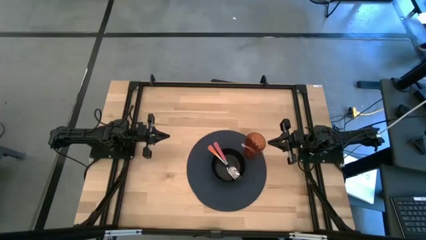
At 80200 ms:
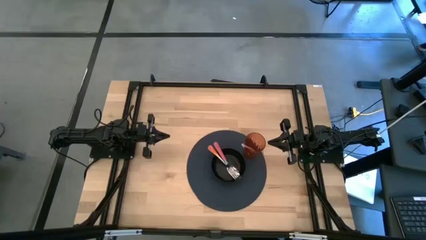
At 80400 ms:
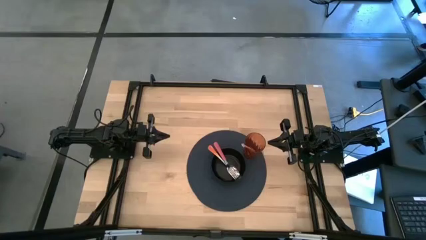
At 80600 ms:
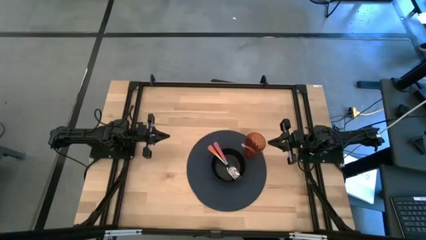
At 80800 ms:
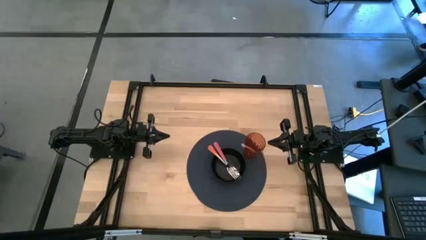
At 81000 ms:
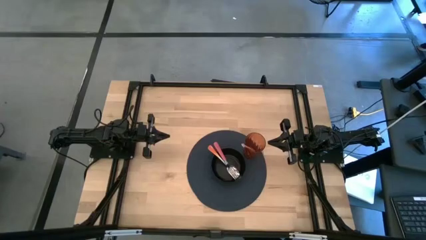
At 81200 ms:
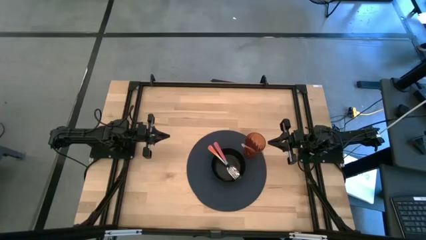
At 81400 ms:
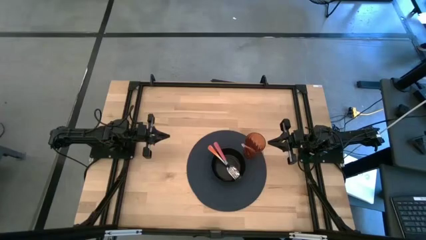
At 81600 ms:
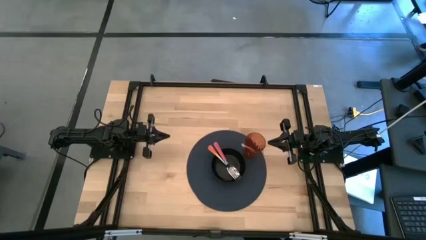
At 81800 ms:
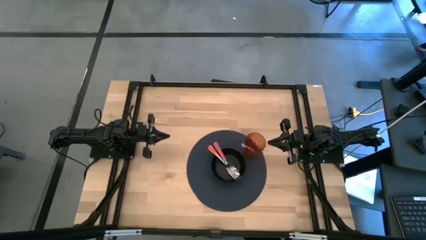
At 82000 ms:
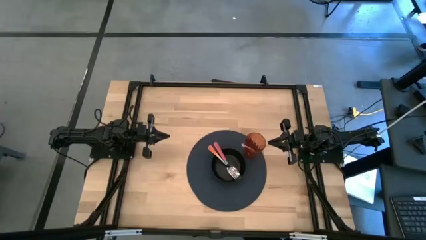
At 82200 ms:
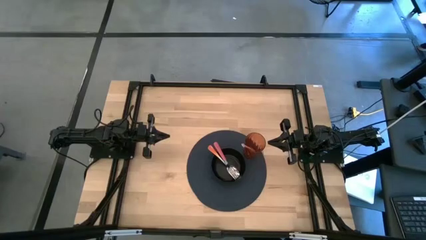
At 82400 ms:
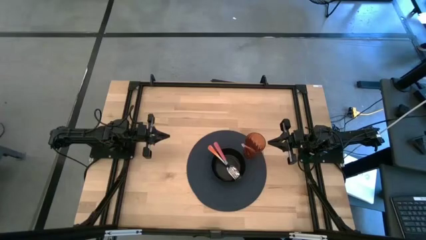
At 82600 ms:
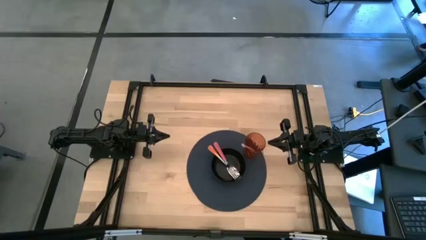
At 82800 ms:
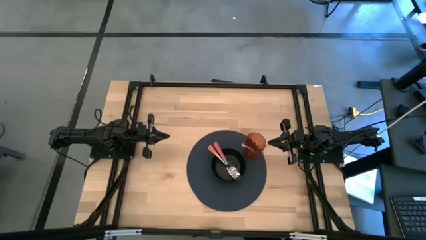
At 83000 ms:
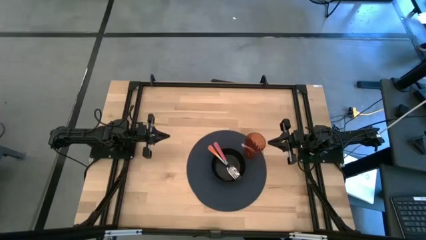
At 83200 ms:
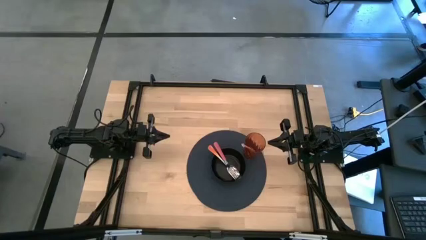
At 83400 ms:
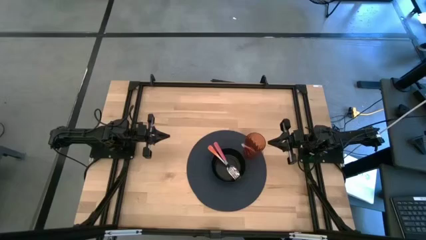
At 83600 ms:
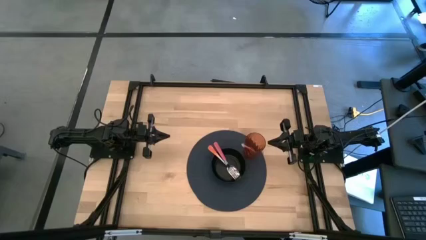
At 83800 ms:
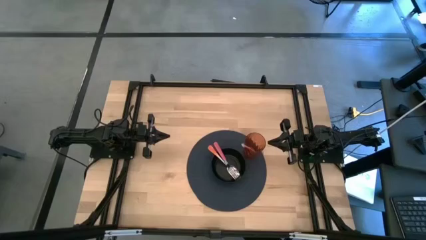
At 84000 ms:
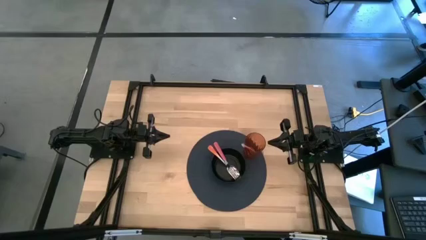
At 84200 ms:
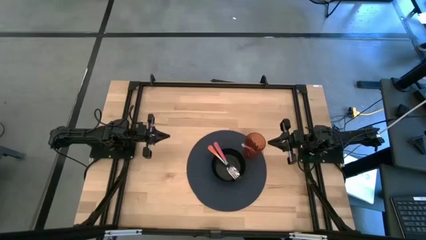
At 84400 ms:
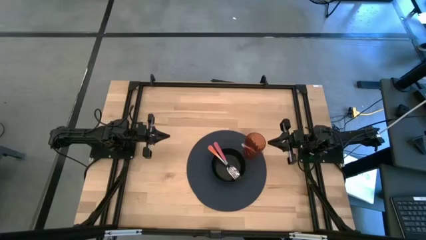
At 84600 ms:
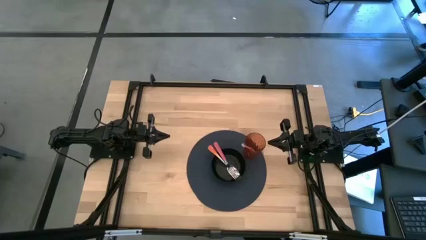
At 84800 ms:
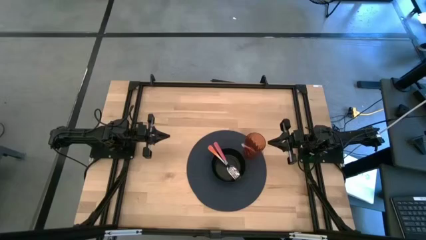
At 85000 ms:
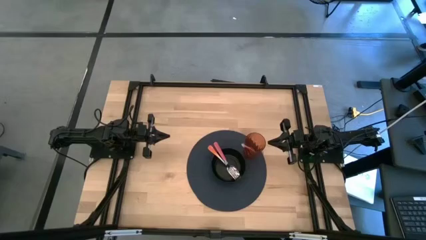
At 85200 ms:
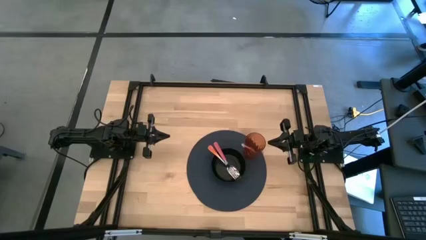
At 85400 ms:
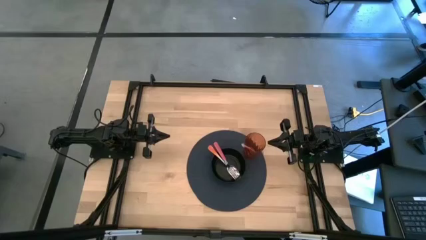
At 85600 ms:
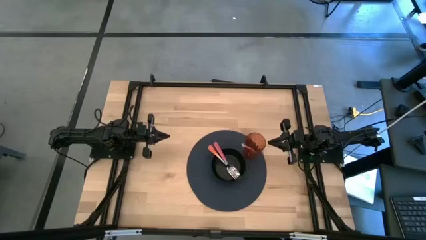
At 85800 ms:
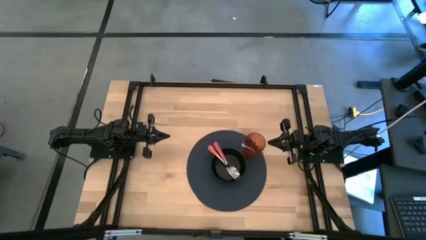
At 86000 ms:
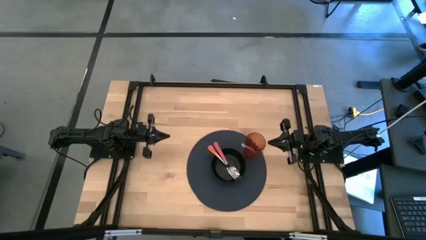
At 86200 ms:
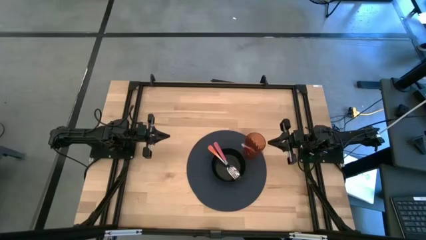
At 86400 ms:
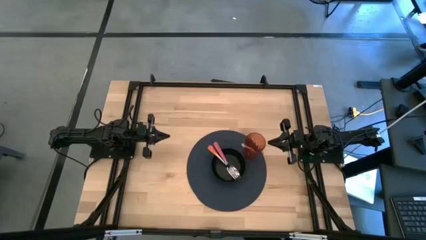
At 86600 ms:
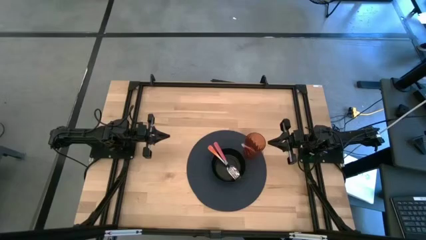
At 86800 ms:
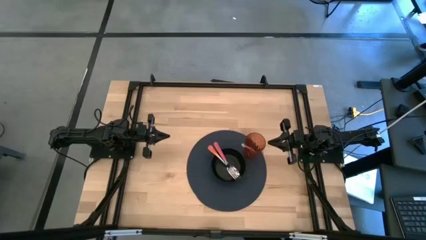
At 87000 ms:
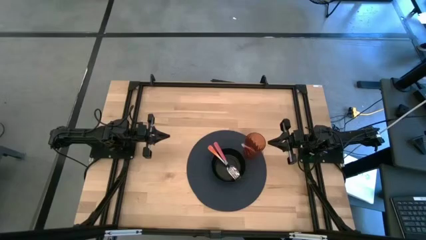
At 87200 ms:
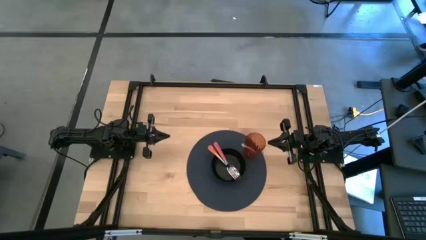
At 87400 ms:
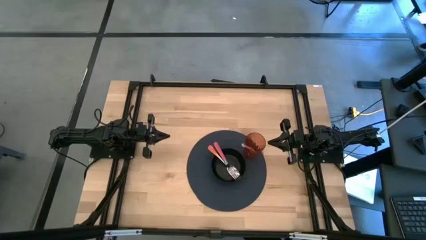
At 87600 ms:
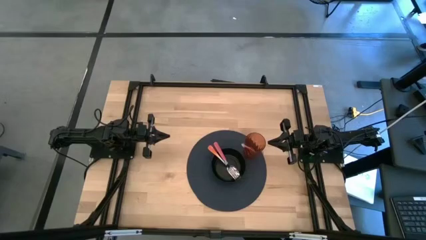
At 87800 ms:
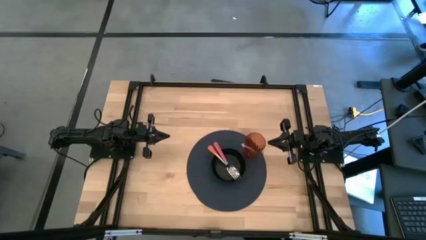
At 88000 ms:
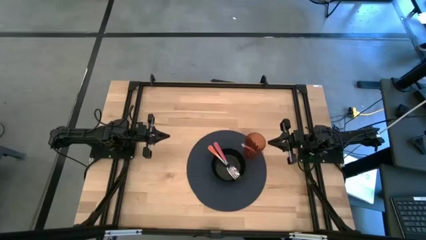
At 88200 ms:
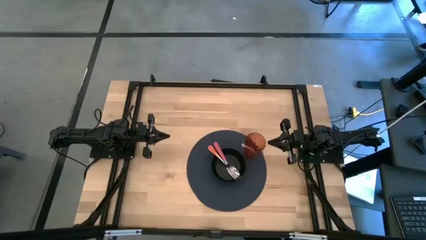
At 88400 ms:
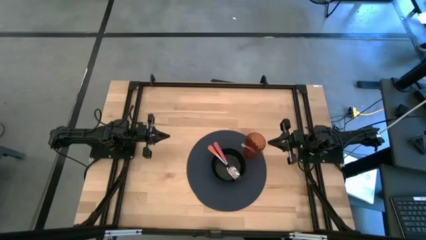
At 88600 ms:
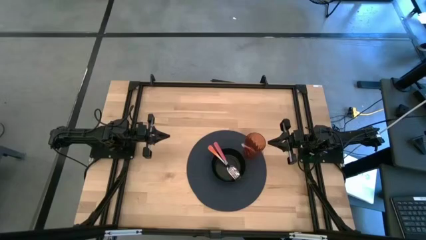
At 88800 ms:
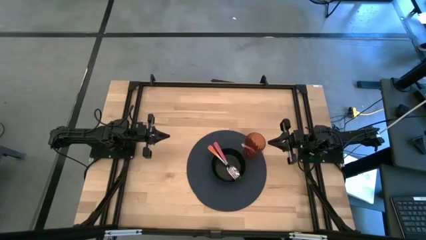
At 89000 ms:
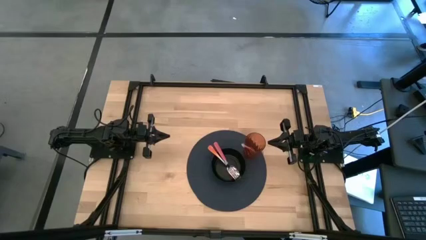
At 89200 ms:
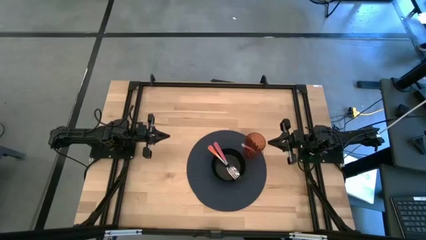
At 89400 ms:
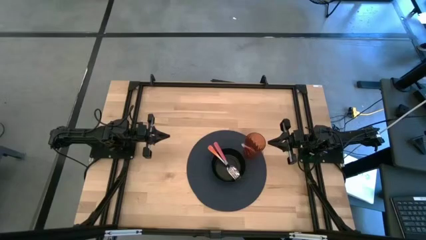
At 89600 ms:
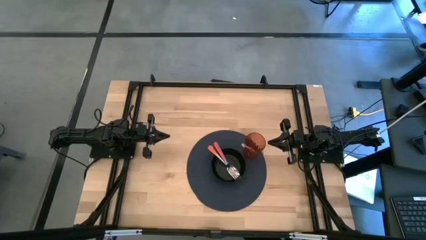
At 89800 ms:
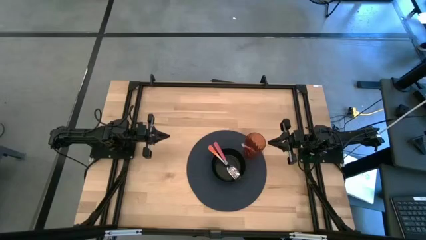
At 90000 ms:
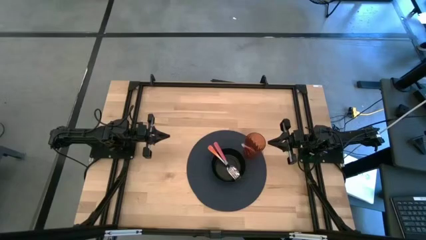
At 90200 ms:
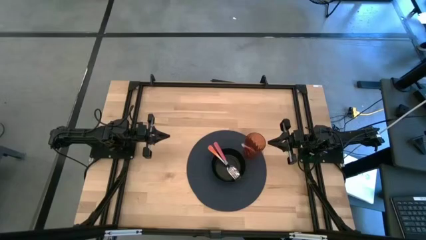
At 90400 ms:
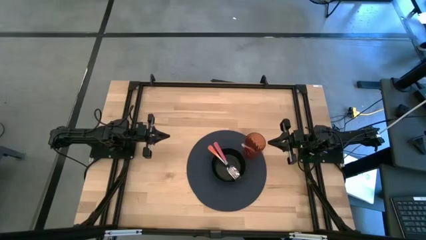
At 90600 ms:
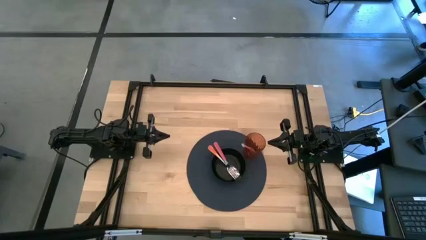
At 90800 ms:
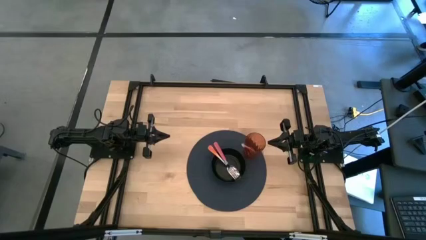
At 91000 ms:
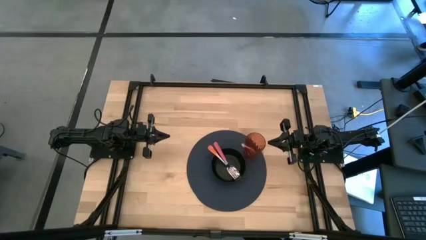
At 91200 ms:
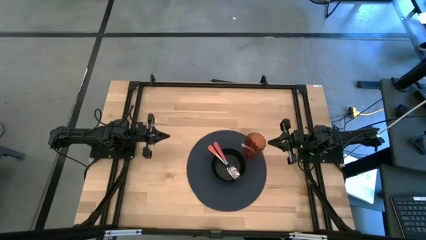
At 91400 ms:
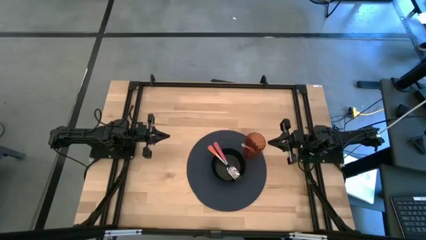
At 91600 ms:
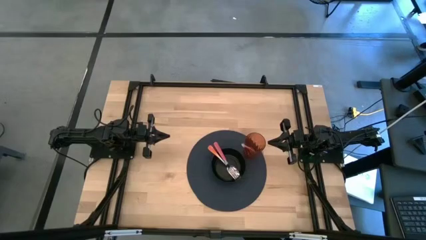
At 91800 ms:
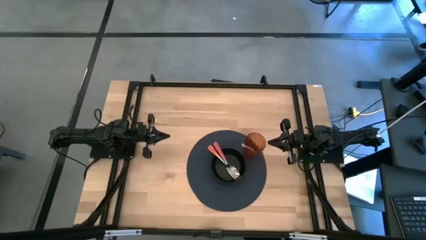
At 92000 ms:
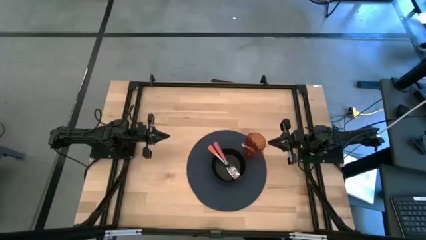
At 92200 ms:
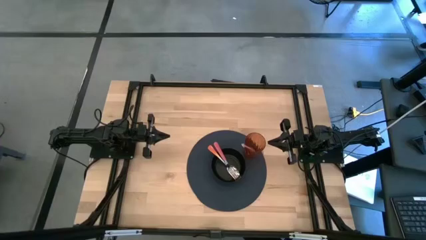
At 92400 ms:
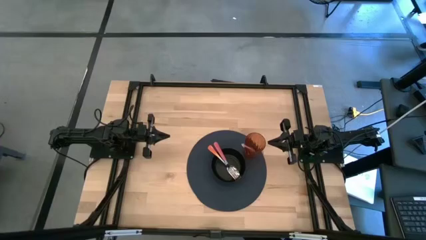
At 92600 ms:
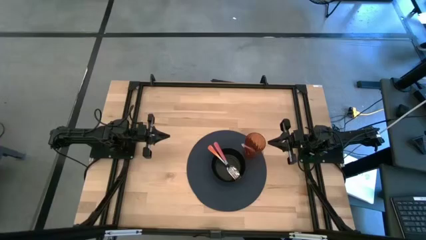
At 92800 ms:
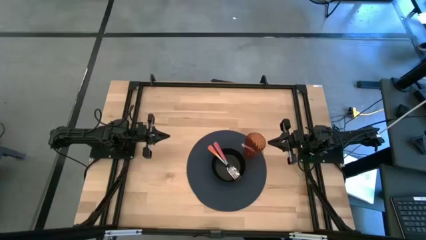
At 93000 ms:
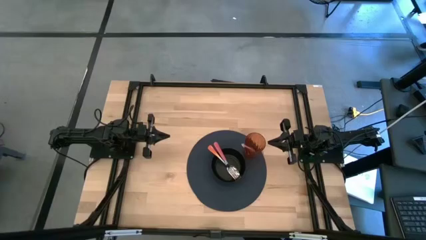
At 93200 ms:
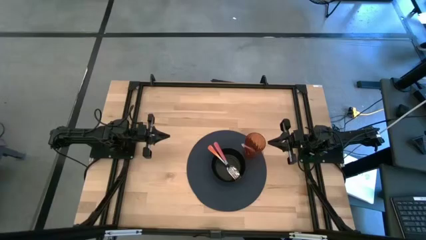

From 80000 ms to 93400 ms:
Task: Pick & Place Utensil
Return to Home Position
